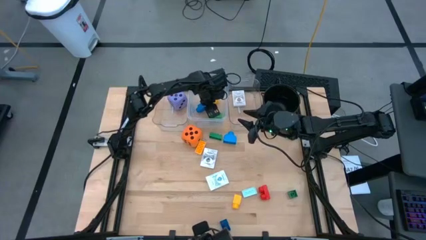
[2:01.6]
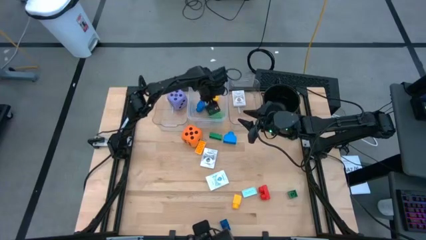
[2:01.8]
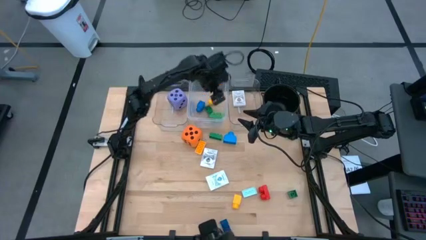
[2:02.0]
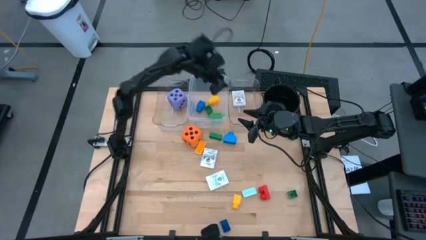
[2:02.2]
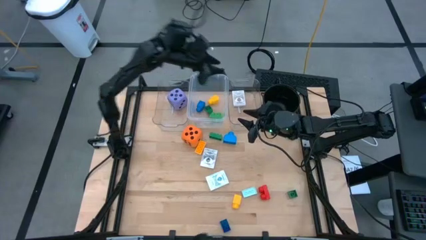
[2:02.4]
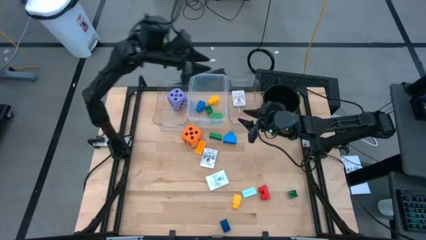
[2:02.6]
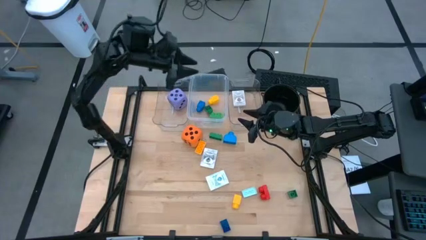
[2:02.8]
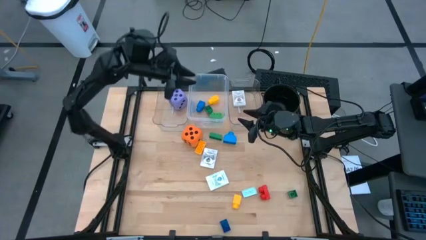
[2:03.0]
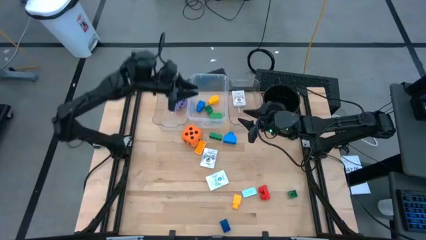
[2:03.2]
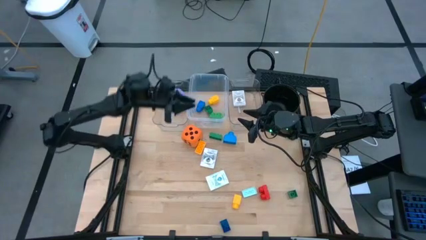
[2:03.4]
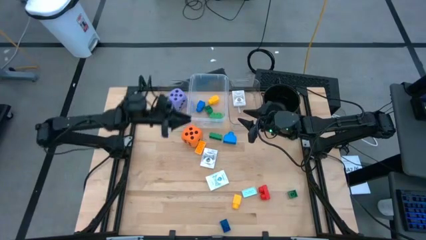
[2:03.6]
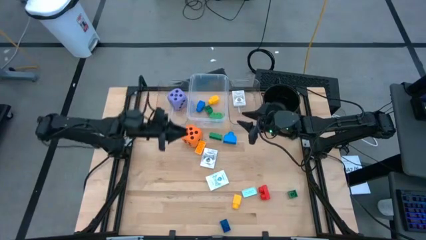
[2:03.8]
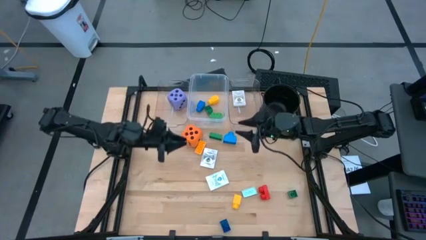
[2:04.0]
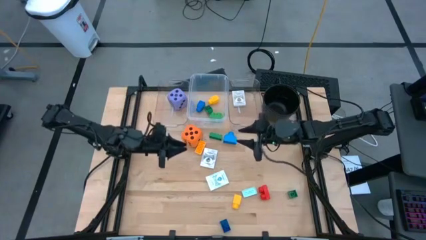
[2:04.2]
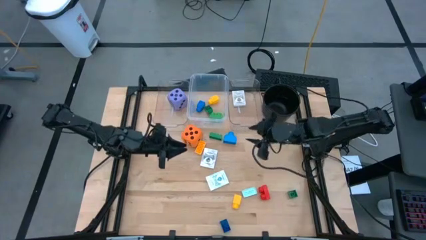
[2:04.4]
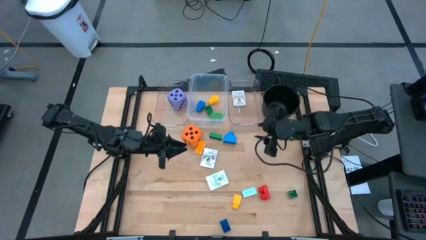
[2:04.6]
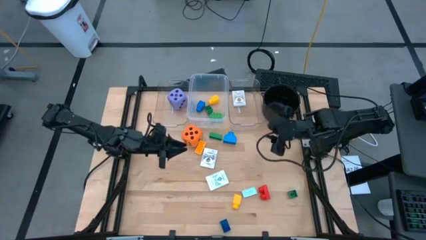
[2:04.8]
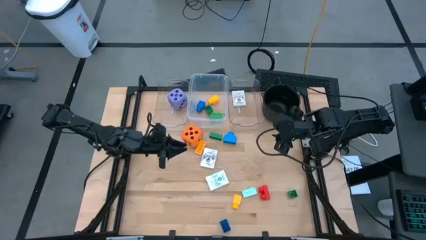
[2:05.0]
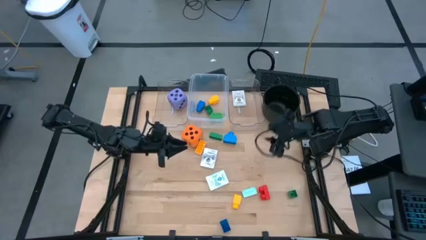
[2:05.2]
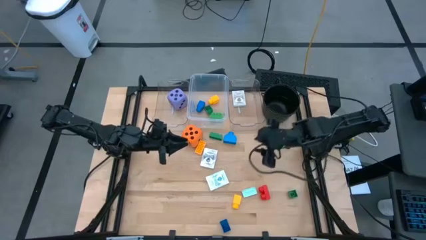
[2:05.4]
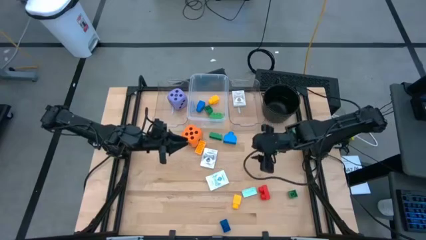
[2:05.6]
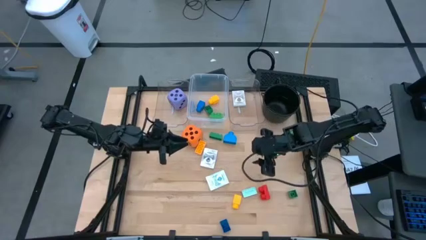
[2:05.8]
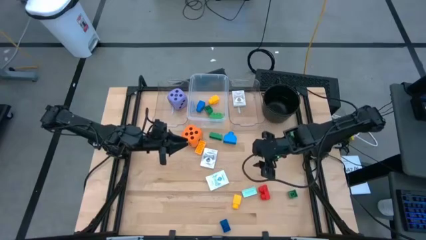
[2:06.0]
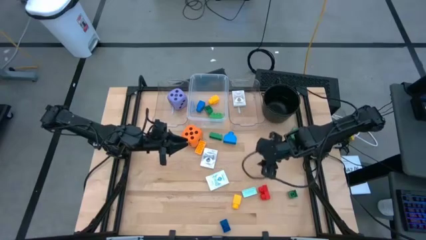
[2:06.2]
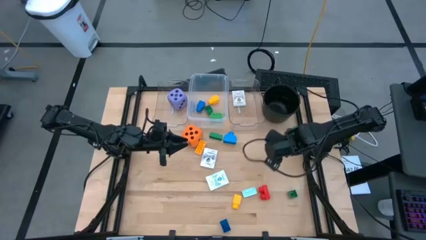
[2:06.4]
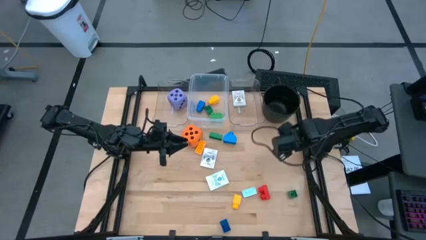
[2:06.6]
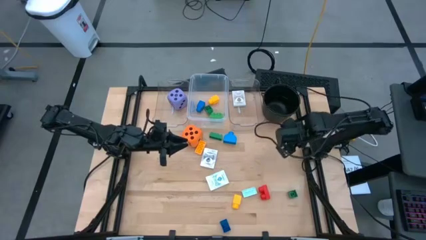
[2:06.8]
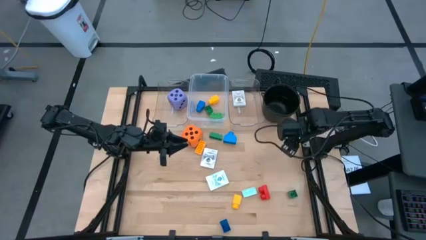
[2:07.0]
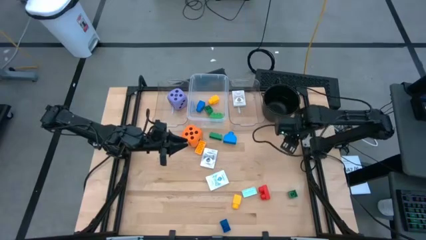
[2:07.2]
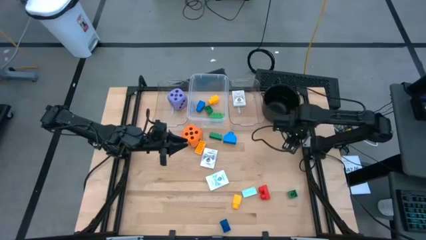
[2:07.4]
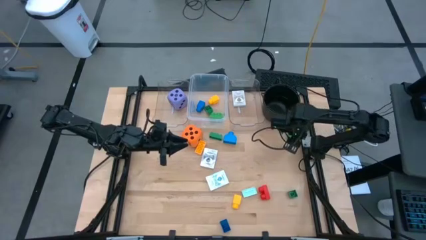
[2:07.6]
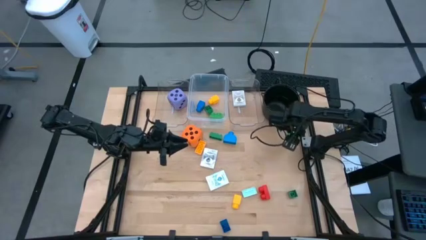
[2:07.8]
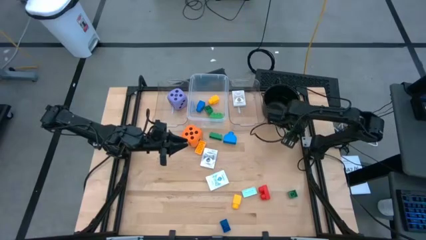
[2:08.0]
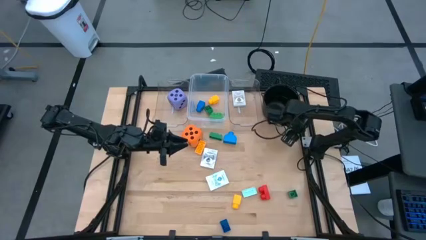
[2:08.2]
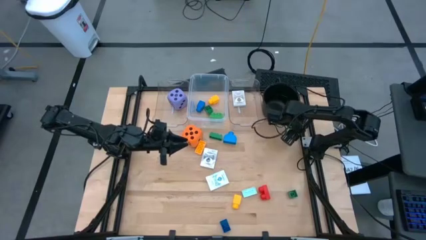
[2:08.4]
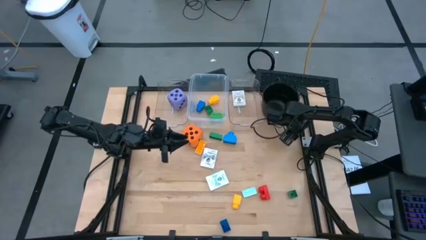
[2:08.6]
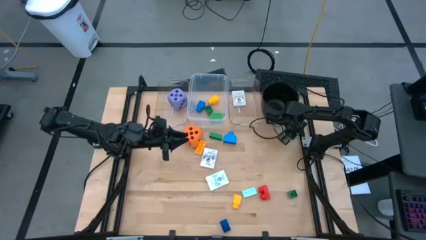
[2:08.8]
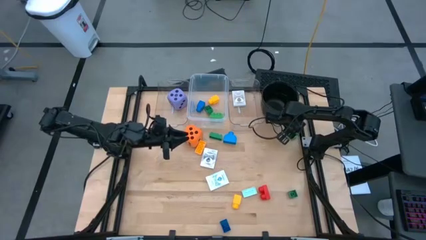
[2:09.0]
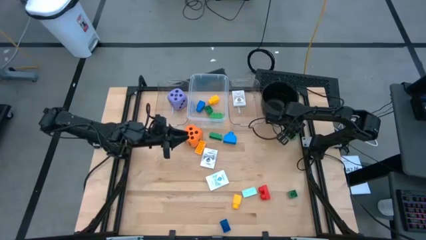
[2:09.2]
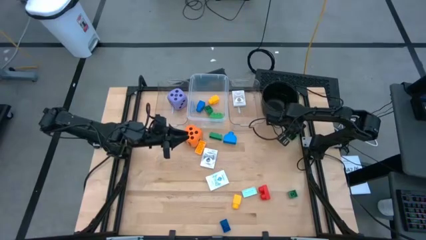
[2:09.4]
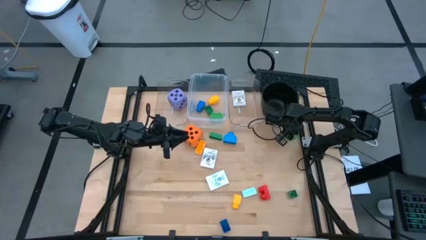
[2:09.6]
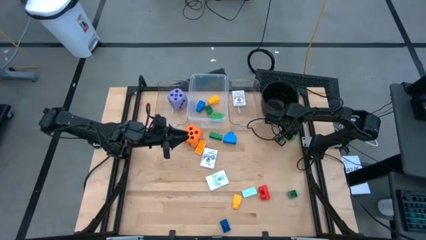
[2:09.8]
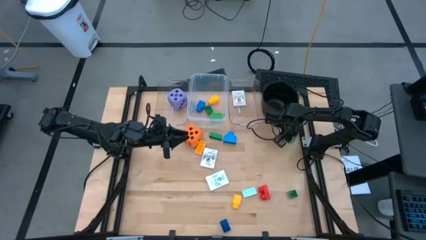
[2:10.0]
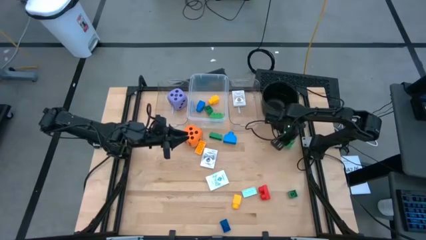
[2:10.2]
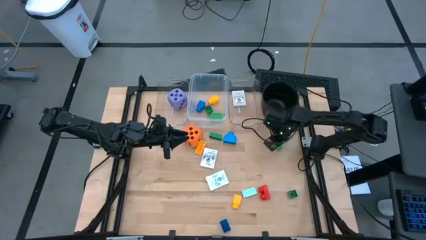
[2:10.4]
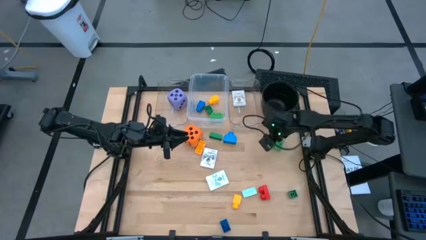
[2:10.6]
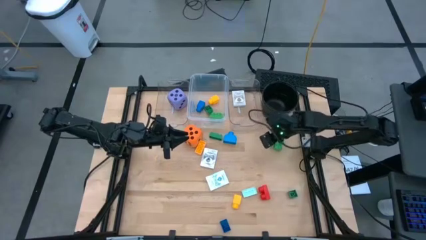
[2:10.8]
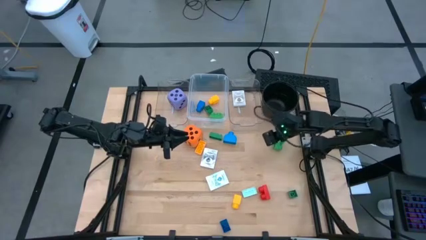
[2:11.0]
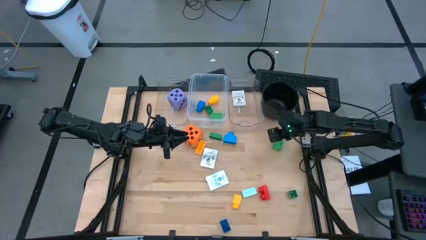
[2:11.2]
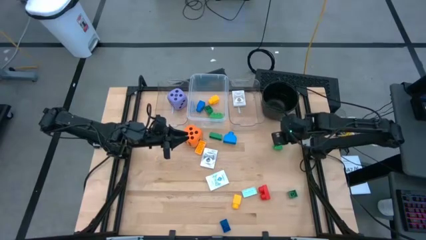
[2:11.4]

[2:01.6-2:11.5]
Task: Pick & Place Toys
Put the green two stud game piece into the middle transparent bin

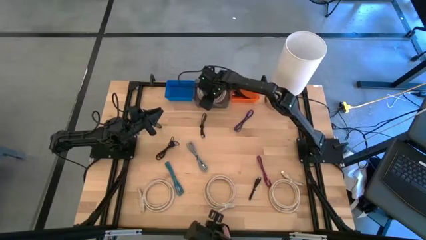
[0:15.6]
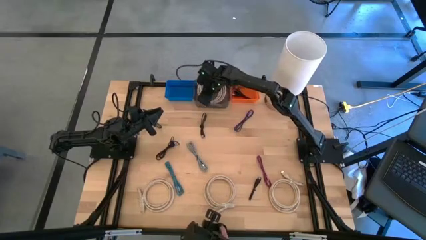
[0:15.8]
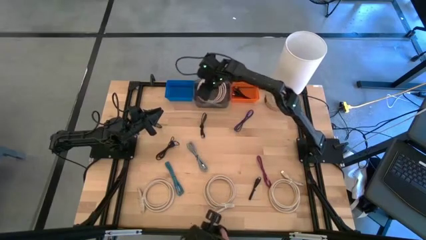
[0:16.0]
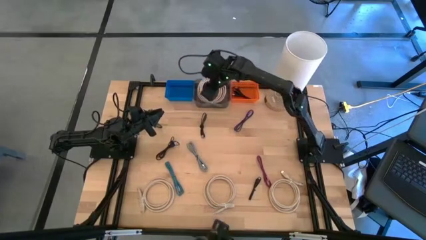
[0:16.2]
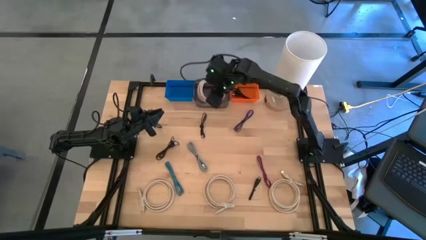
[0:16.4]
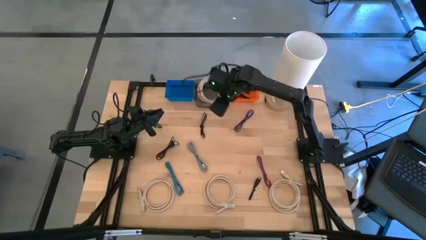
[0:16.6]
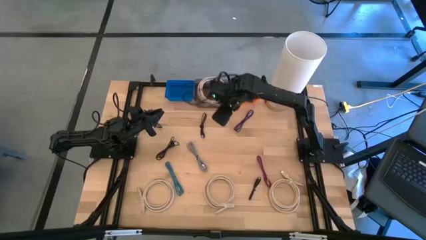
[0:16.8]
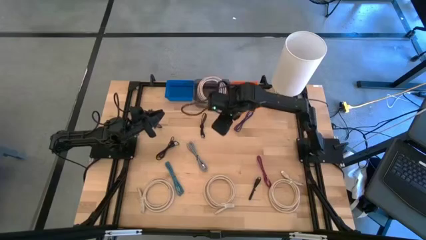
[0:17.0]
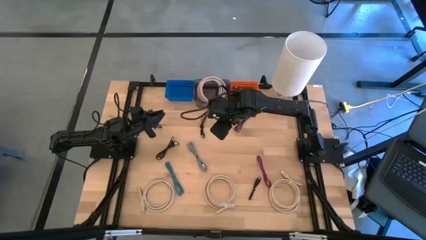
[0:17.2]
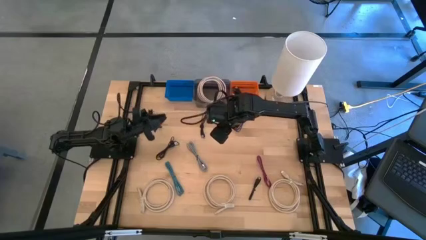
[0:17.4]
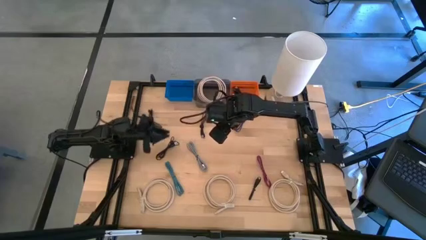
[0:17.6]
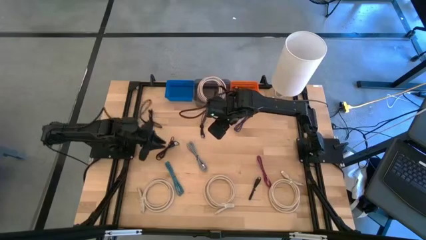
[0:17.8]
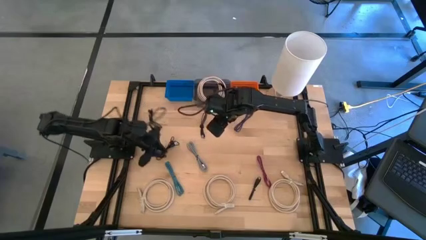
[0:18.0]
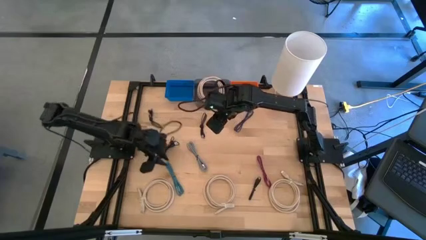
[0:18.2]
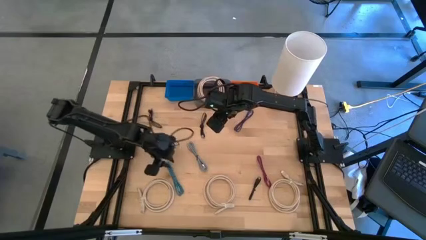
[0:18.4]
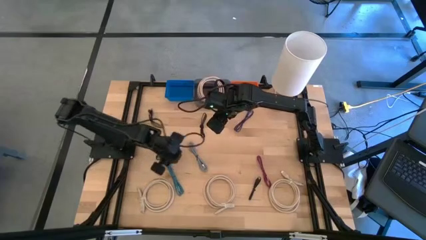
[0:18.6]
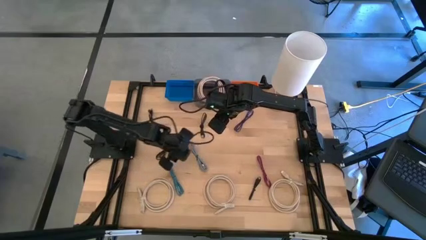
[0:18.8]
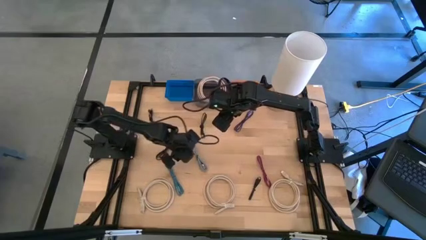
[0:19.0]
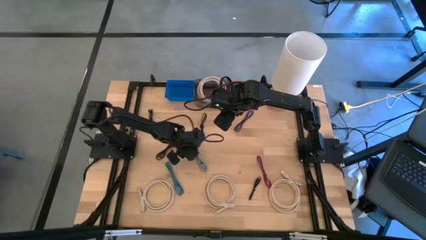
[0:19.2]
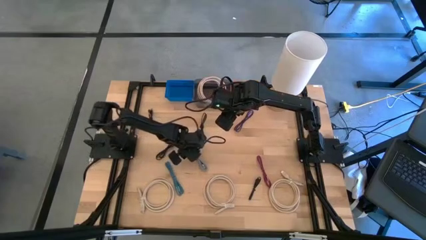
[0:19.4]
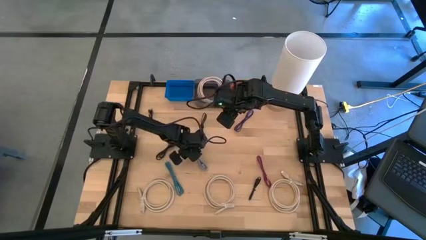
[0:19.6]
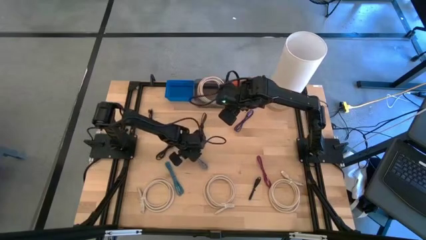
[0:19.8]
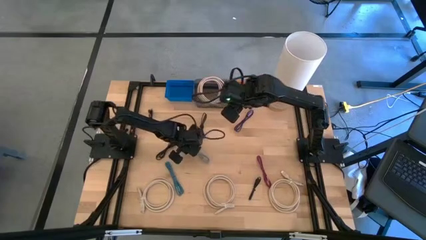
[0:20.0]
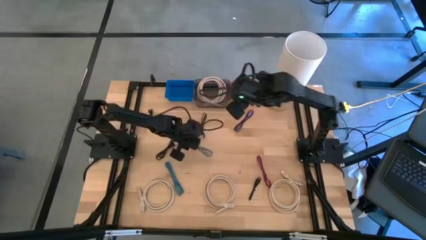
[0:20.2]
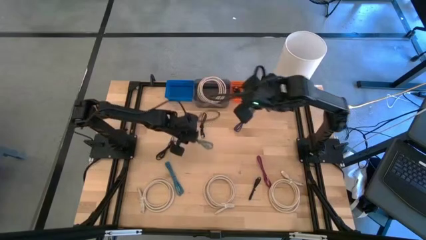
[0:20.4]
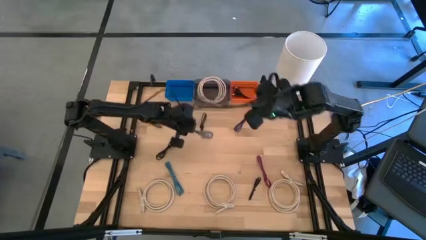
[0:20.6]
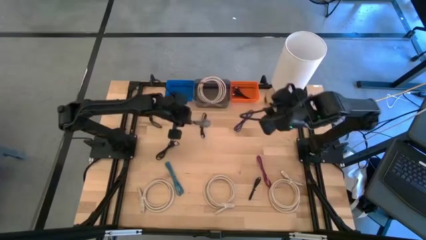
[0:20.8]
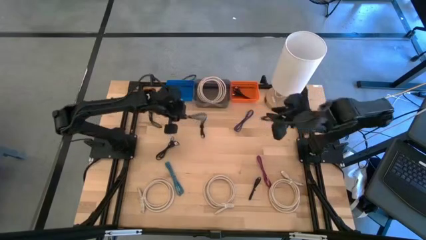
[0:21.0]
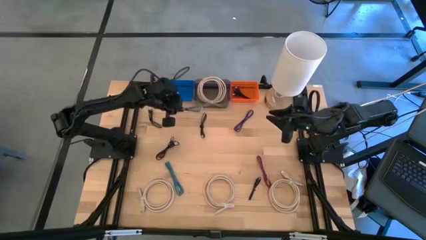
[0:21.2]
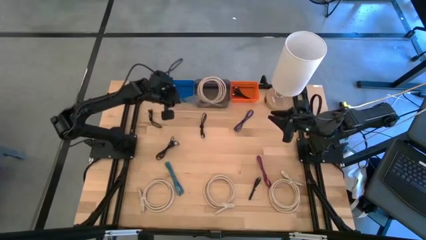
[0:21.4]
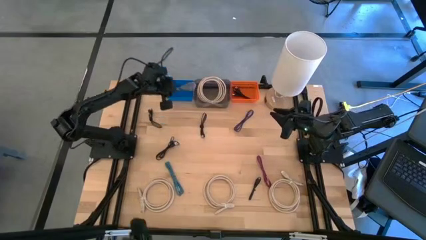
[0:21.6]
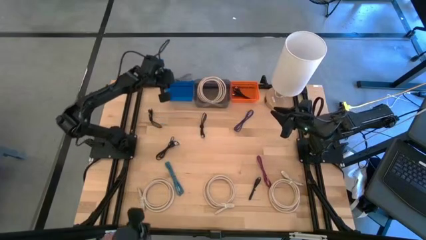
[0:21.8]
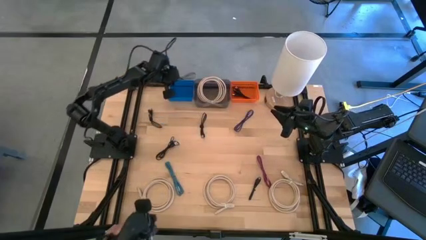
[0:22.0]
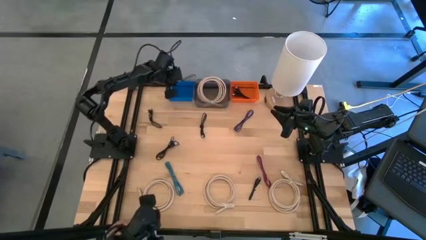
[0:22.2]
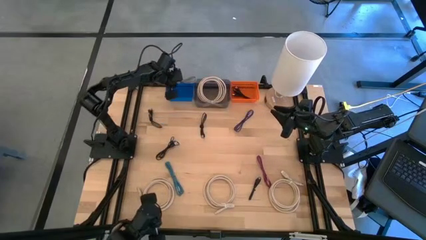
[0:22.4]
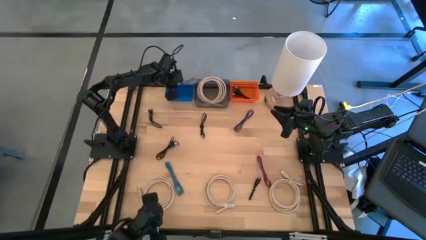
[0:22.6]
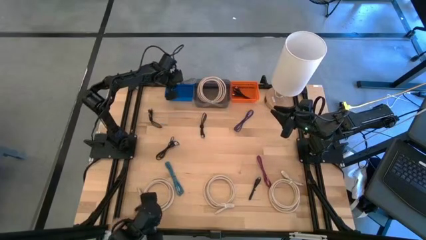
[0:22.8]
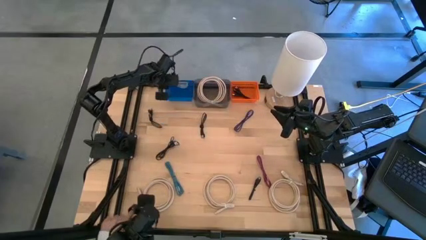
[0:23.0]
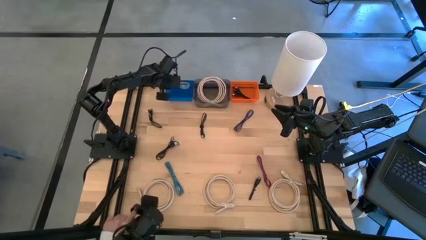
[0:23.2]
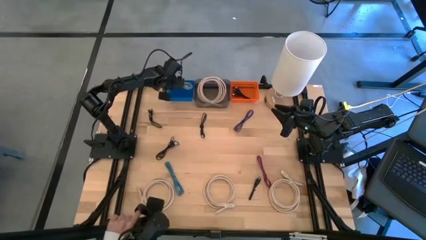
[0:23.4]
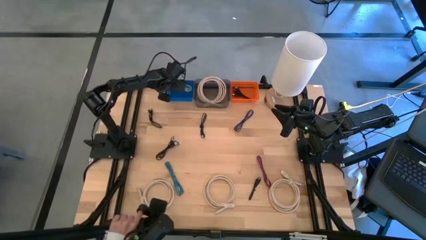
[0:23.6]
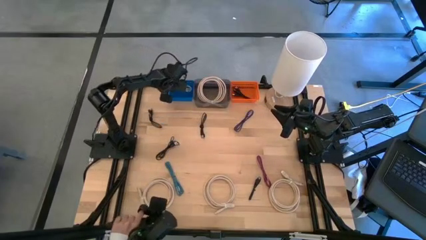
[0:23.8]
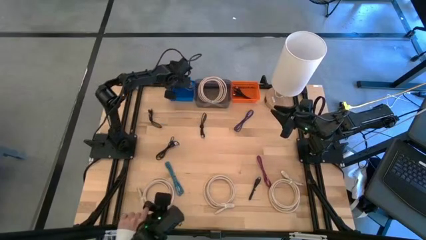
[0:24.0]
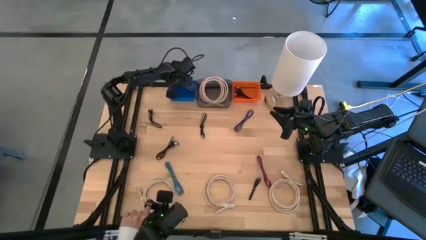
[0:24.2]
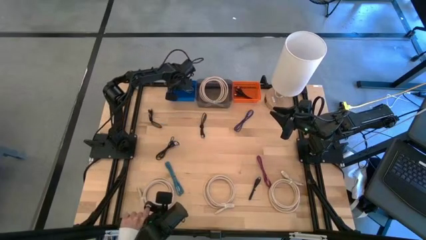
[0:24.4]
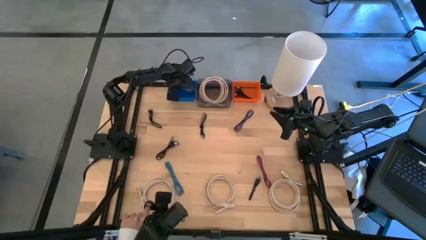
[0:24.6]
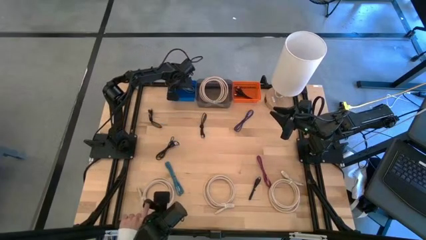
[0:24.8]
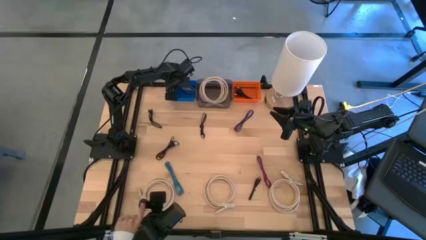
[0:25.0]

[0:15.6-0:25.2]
Task: Pick & Place USB Port
Put the black white charger cable into the blue bin
